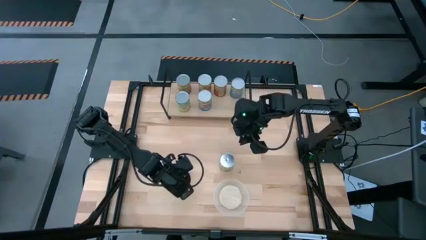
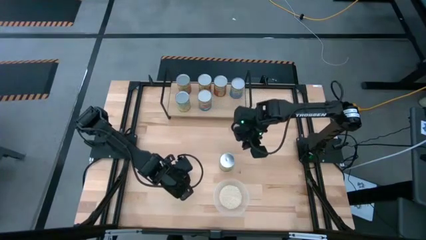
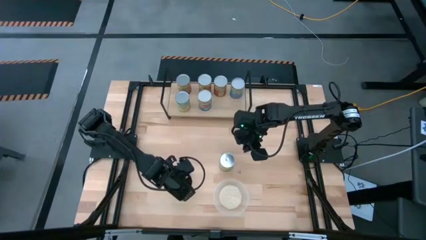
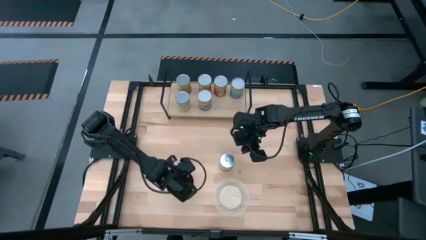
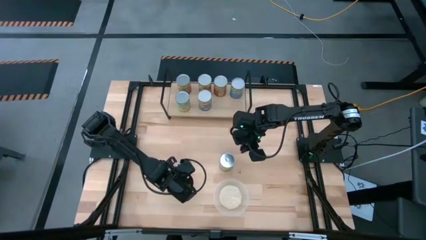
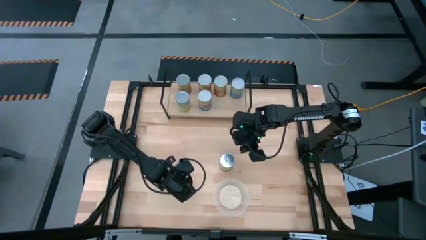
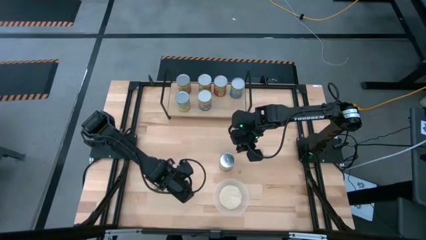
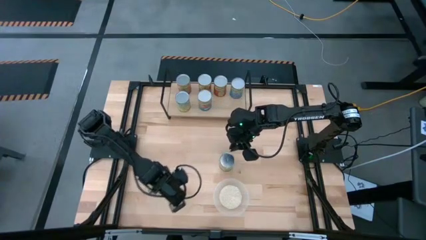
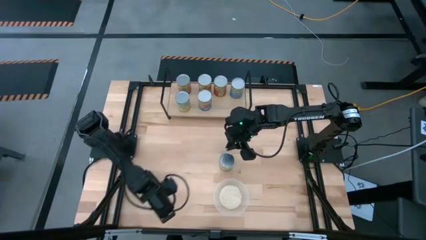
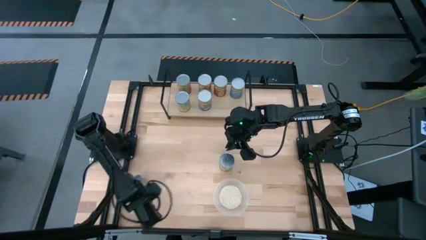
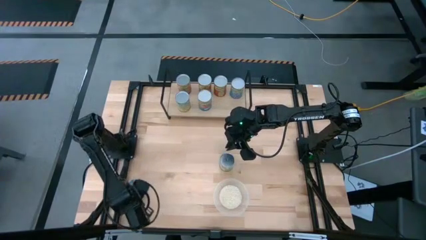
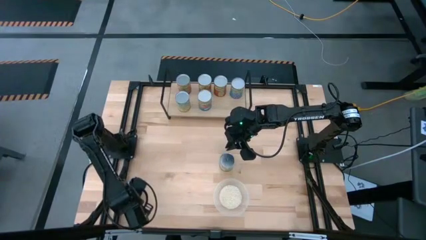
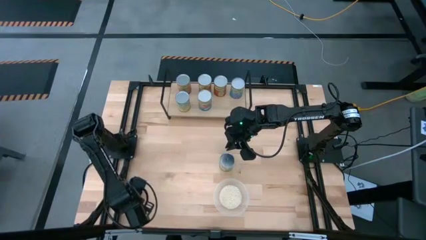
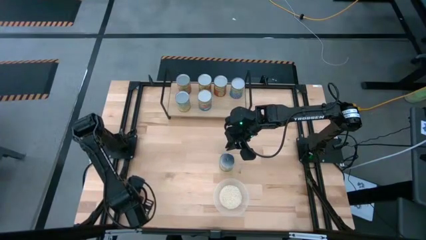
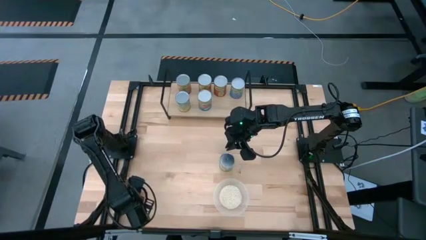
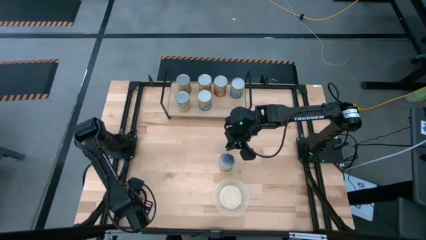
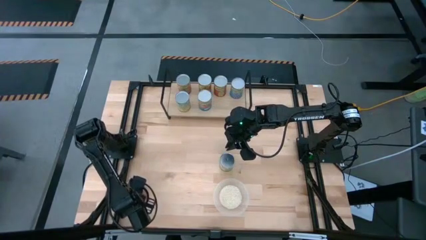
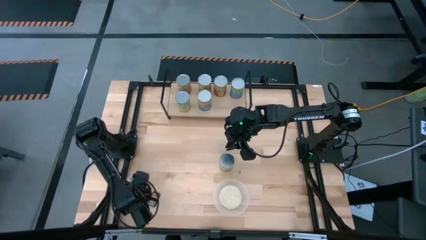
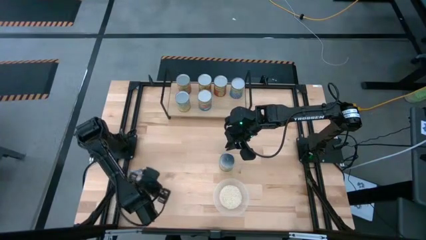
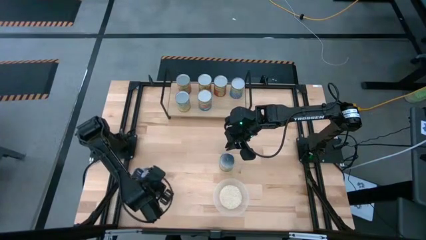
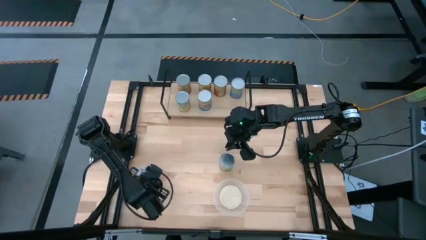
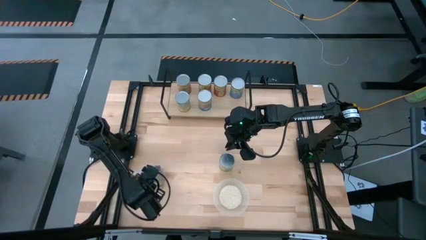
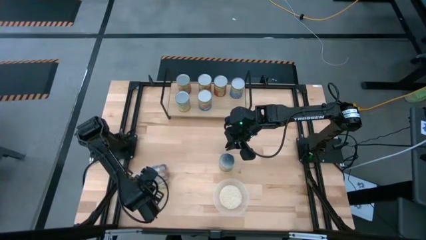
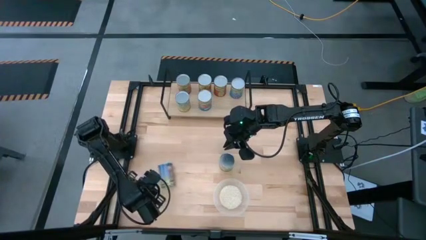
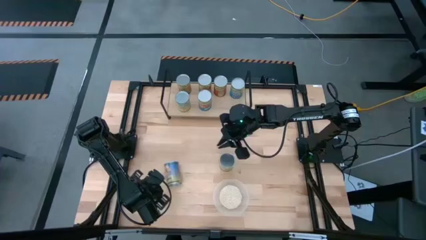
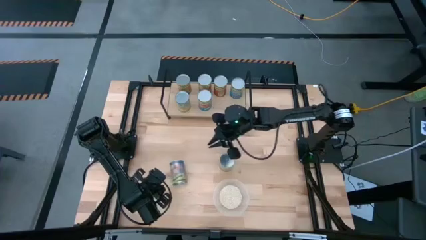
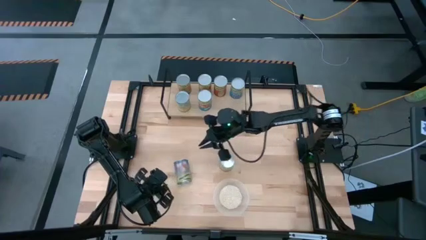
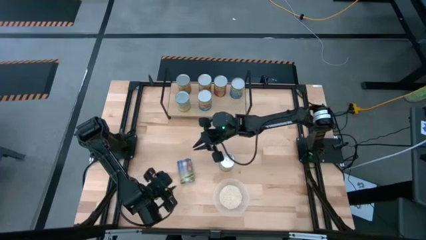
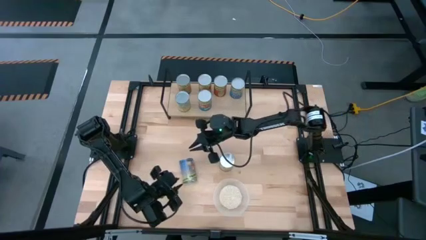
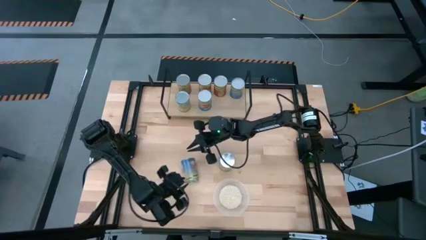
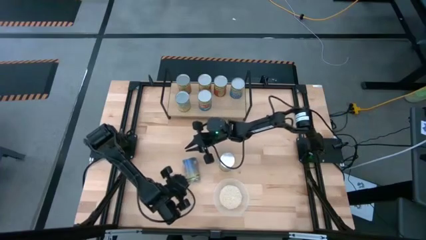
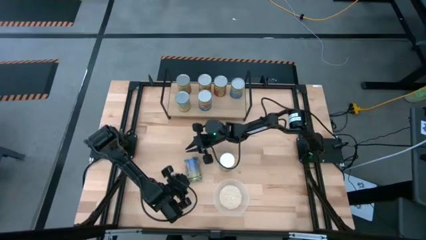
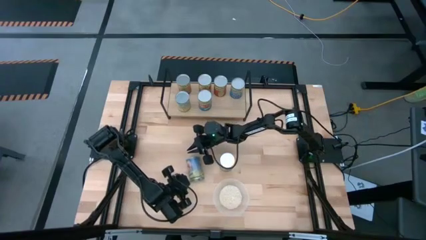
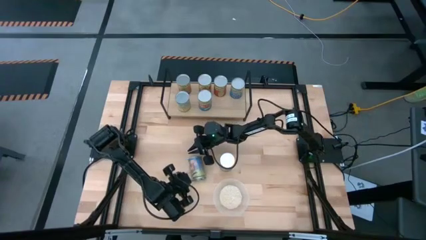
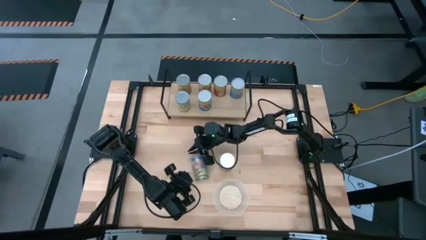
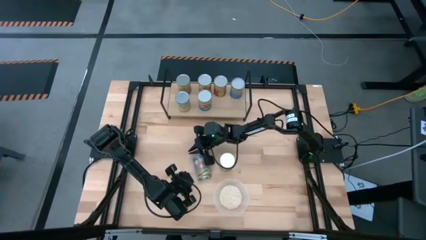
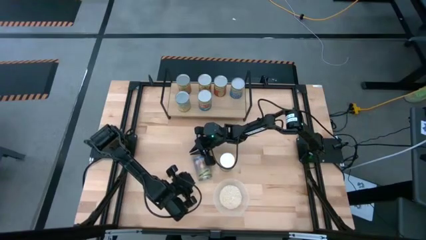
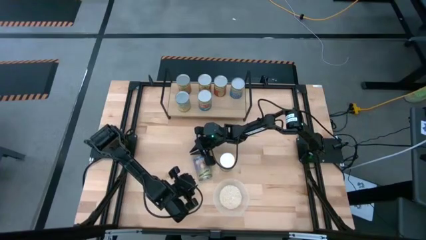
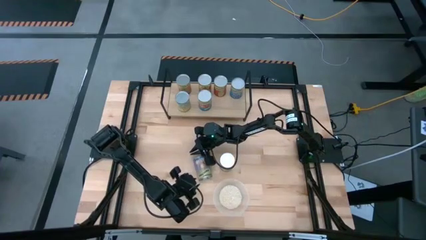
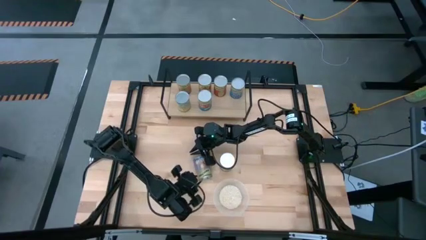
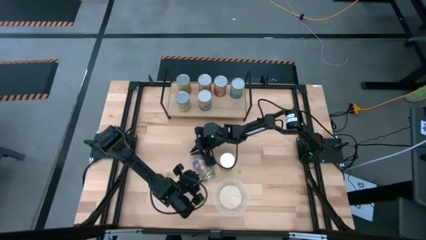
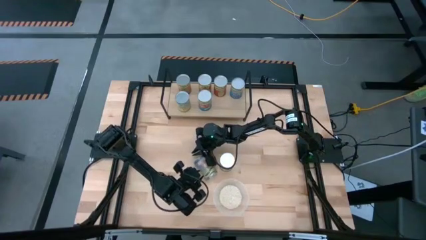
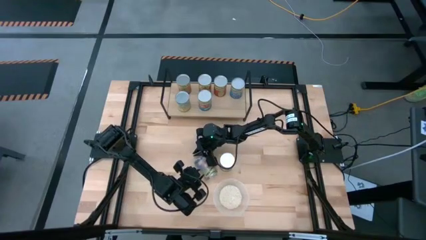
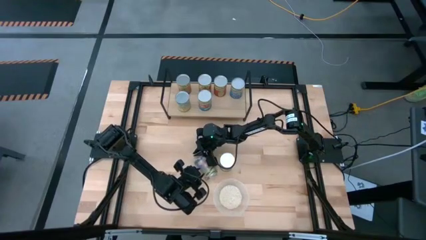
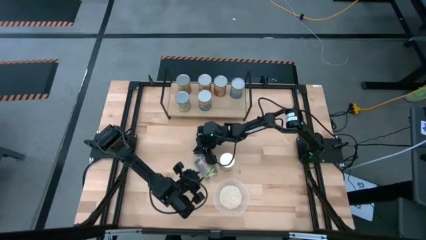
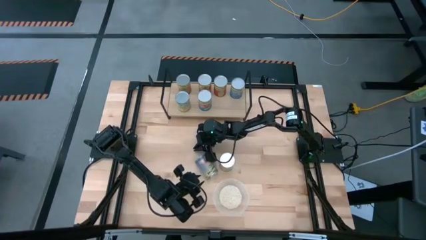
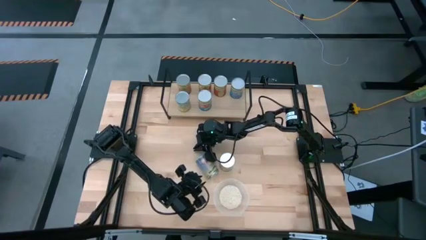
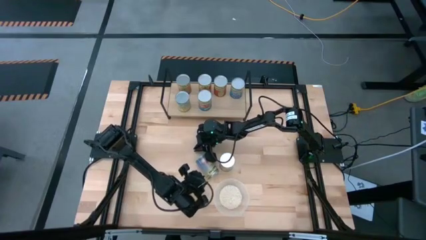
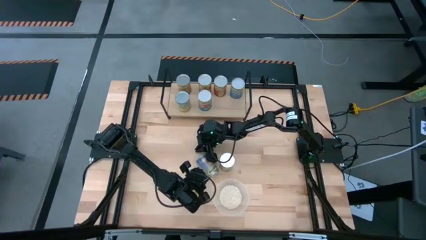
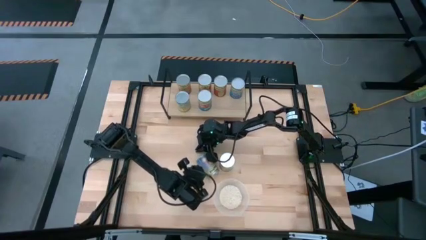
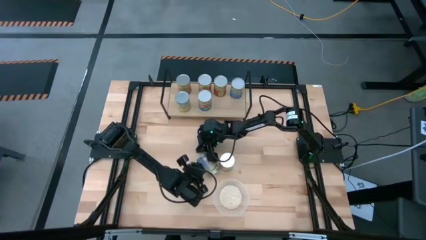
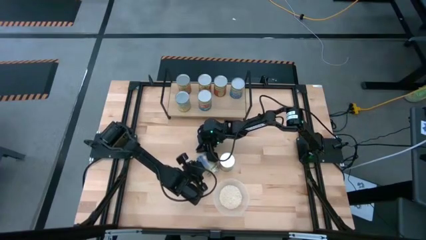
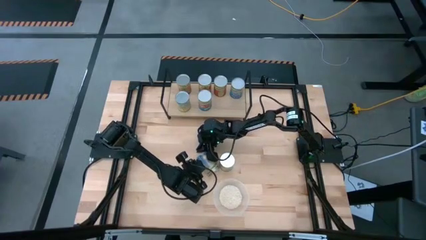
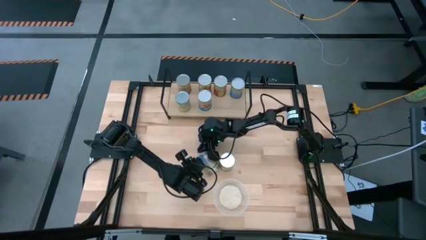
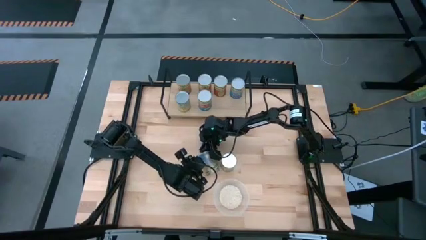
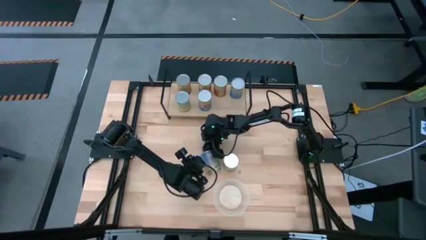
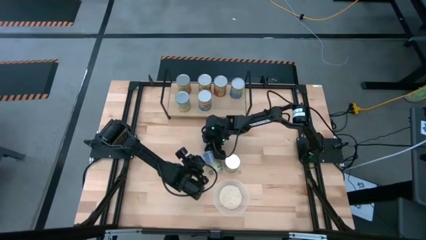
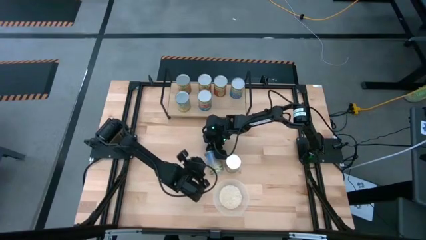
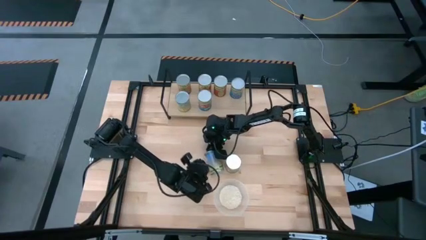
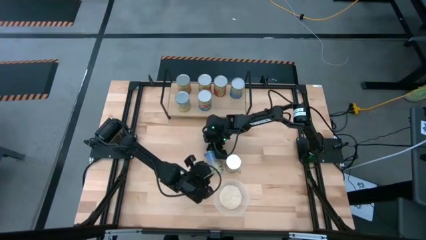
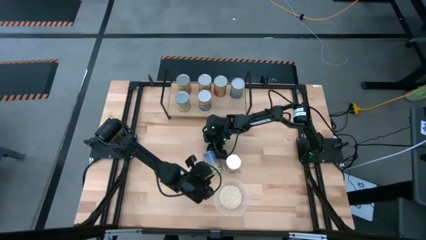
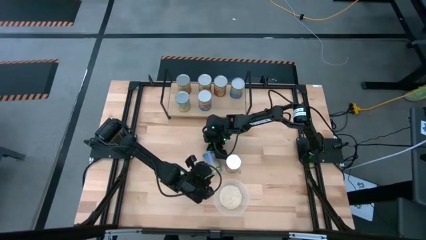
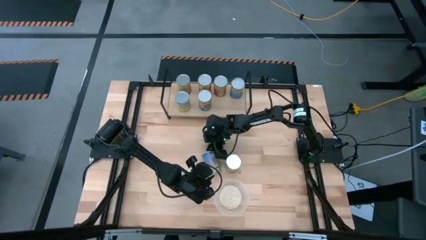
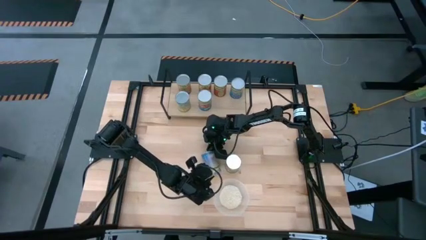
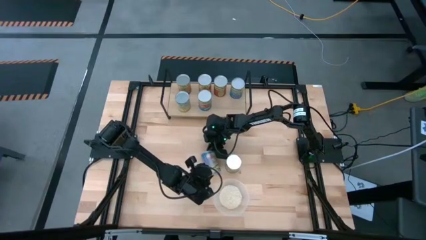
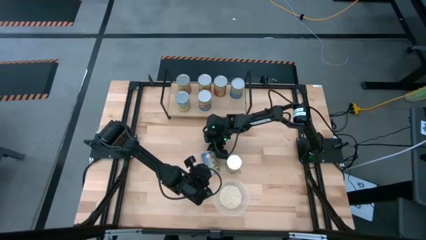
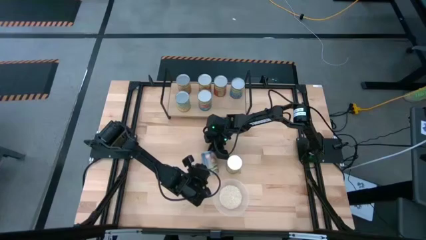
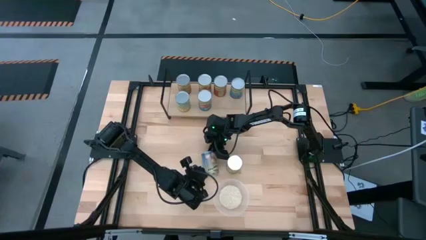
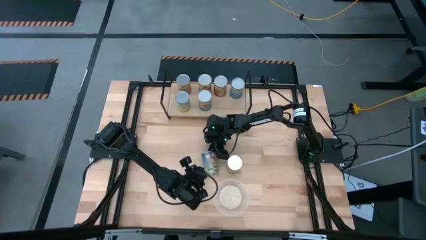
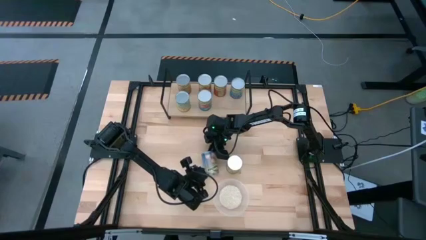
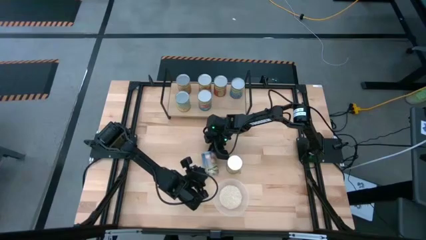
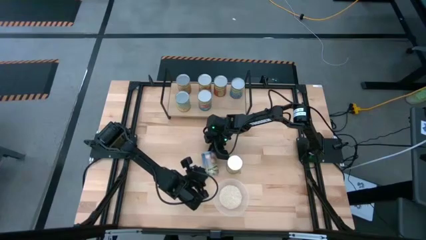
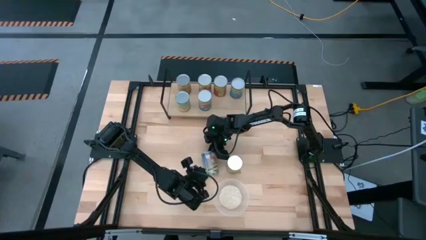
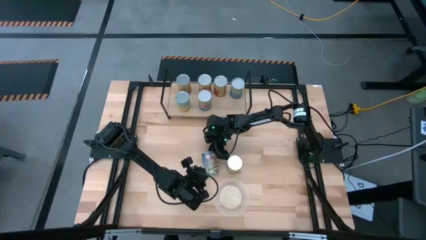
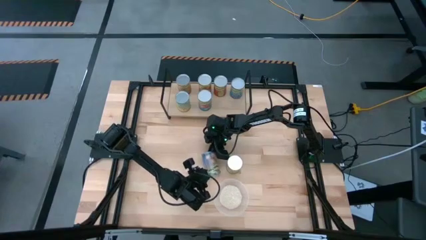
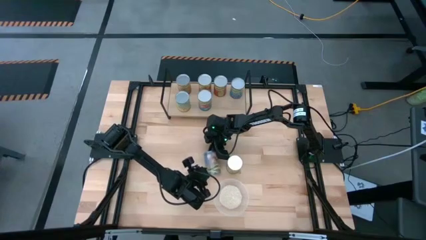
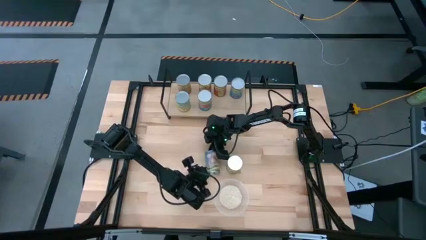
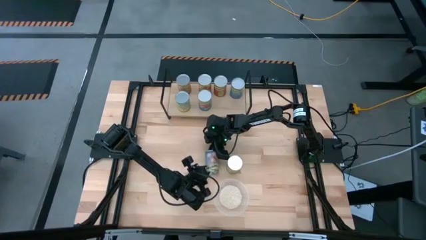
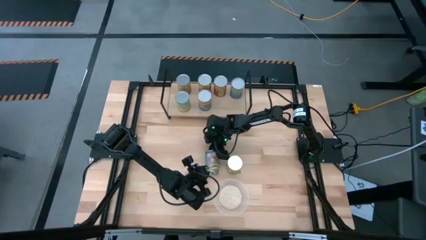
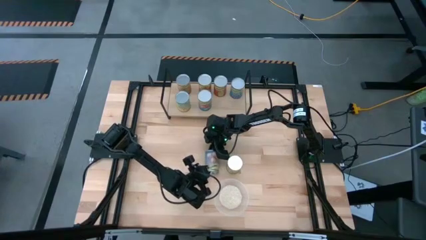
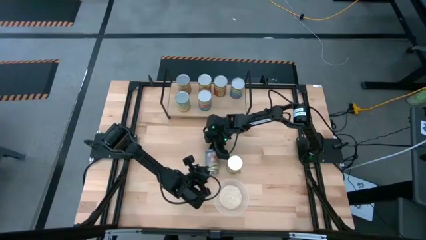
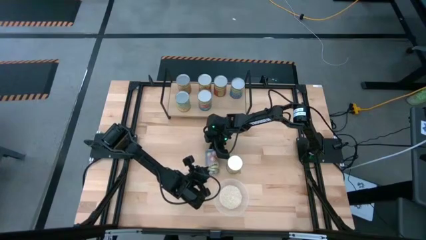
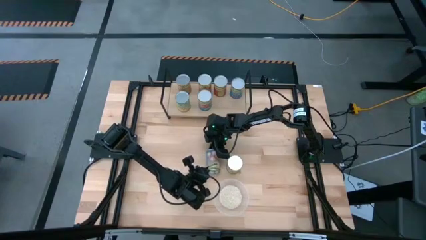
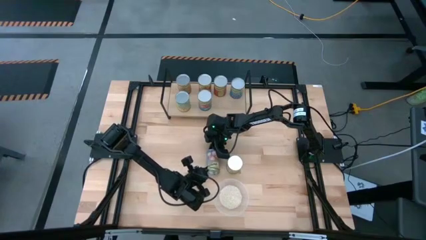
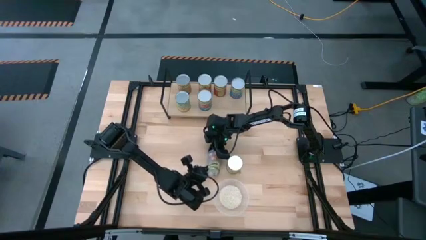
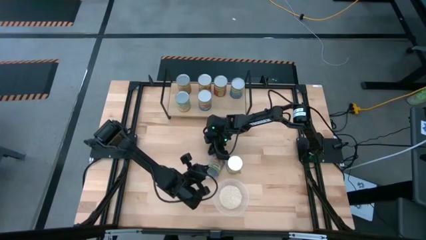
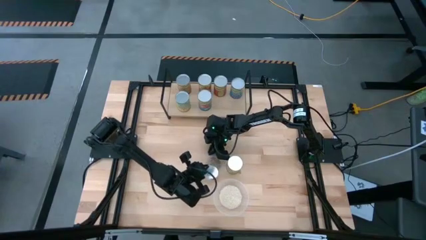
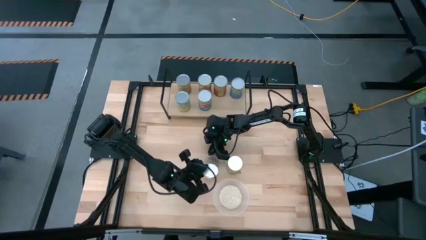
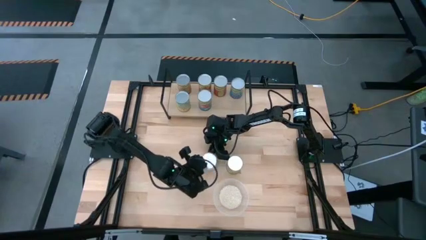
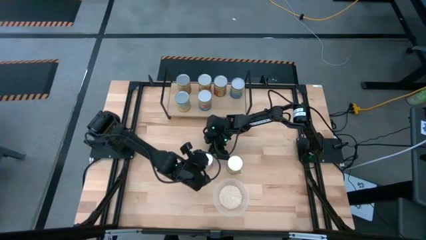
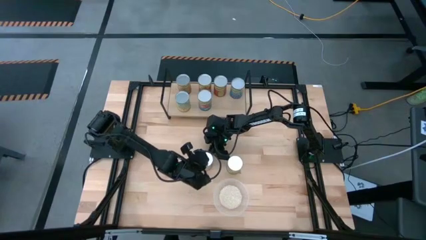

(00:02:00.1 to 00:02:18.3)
Task: Pick and place cans onto a shelf
Put the canned peaches on the shelf
